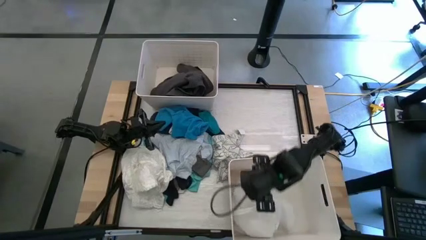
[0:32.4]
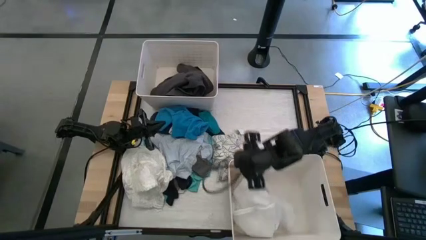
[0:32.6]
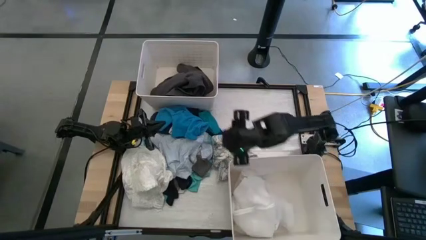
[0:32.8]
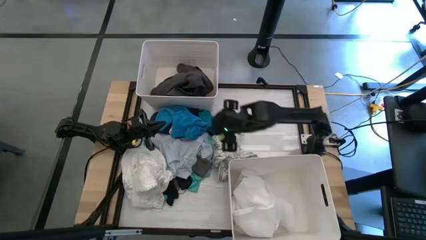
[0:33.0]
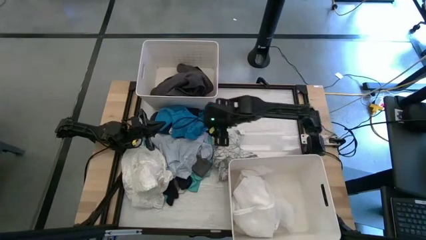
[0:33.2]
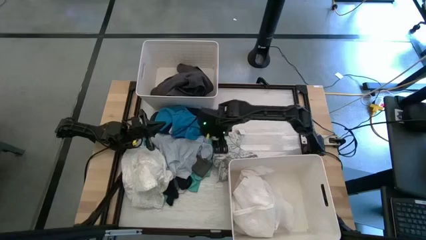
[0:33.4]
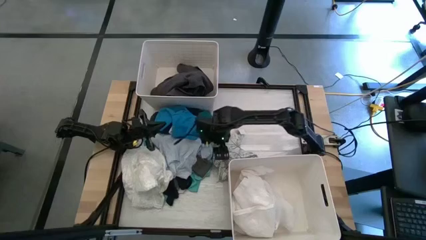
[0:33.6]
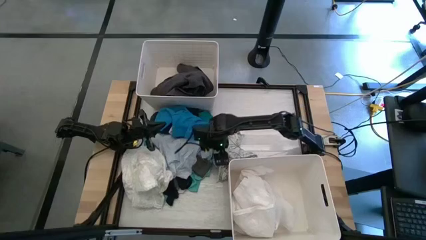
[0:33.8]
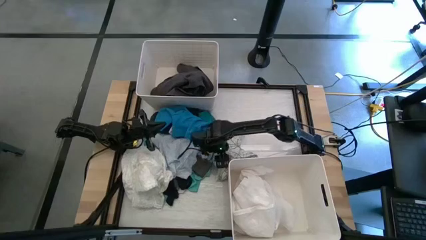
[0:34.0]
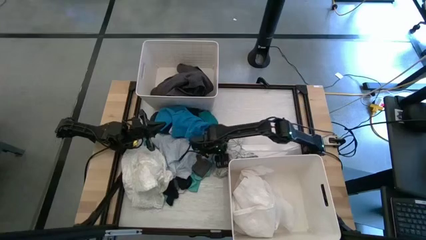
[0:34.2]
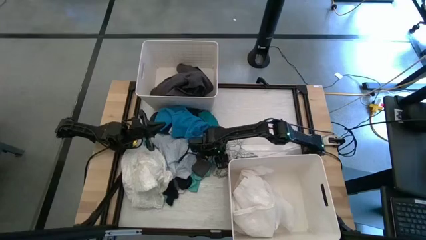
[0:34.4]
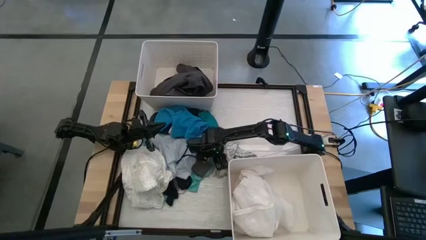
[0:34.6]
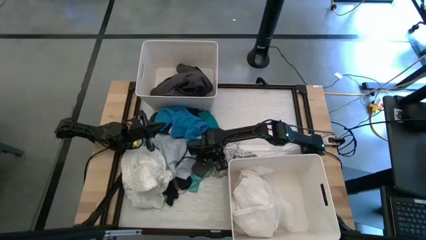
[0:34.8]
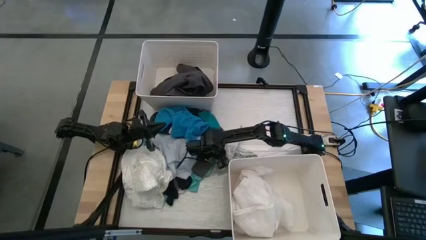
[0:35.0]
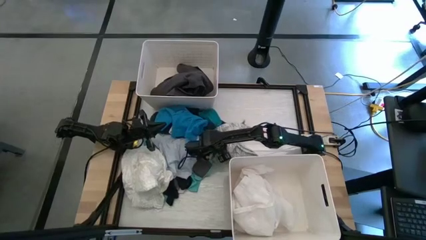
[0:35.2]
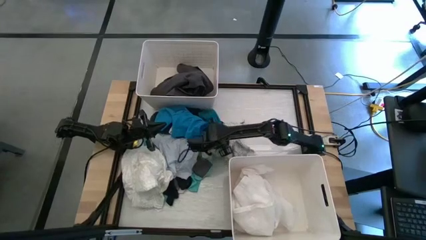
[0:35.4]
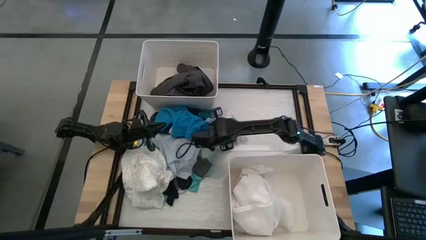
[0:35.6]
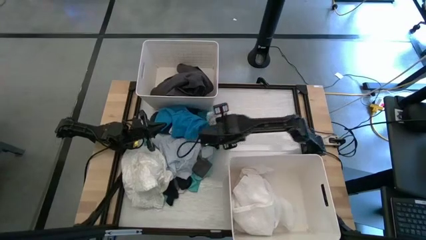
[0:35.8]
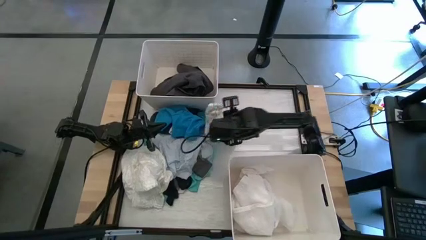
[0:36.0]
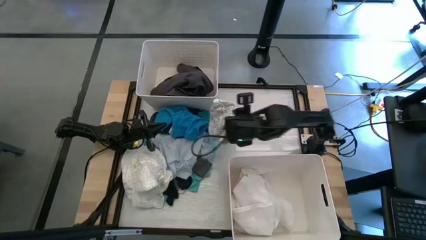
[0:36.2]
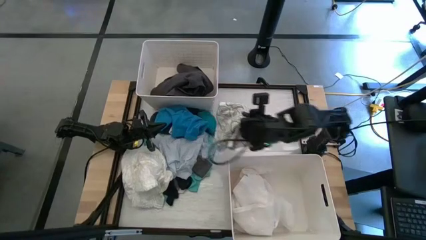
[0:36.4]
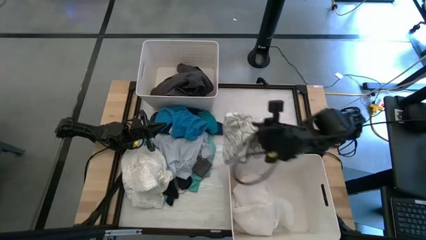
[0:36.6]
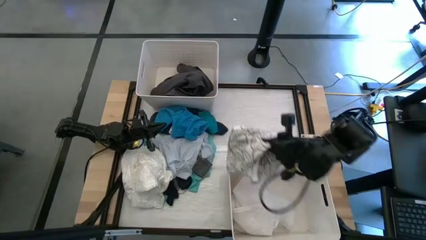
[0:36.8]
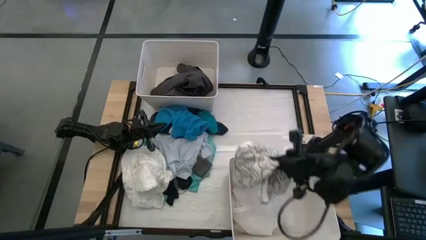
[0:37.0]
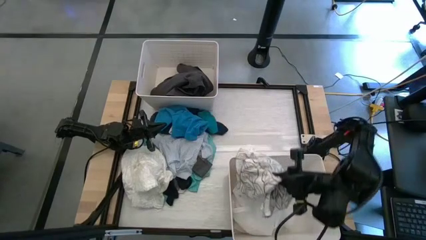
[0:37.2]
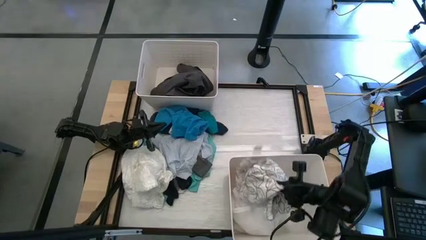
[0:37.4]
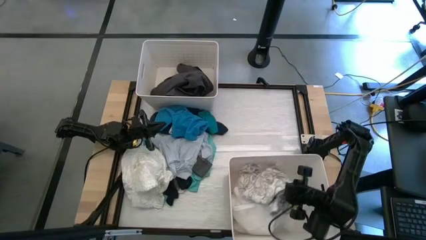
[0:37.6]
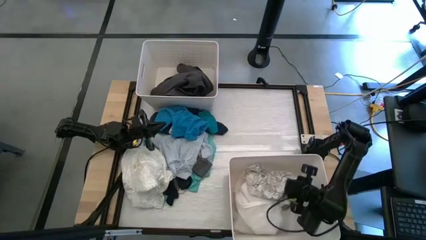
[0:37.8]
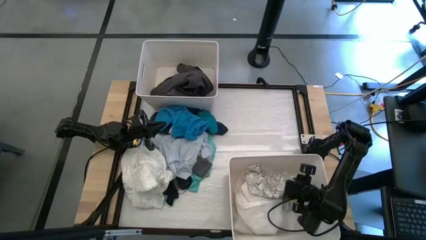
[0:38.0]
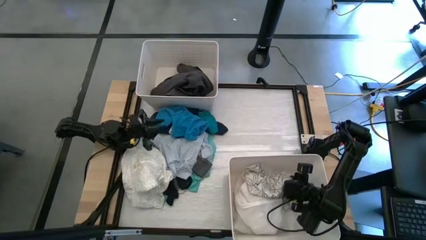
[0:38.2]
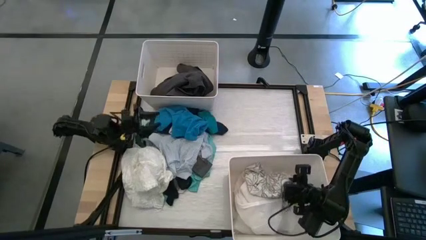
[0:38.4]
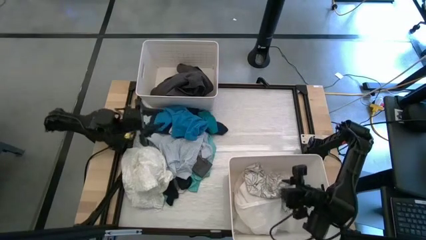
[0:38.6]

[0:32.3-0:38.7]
Task: Sort clothes
Put the white patterned shirt into the bottom white laundry organizer

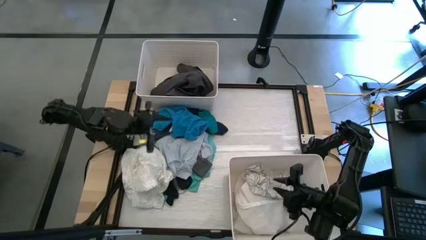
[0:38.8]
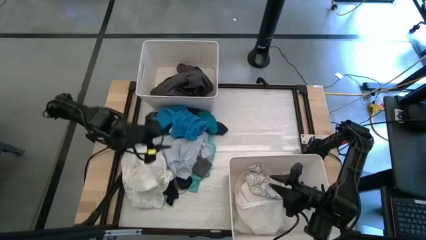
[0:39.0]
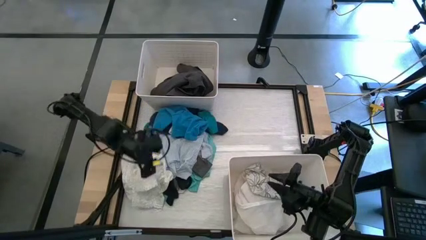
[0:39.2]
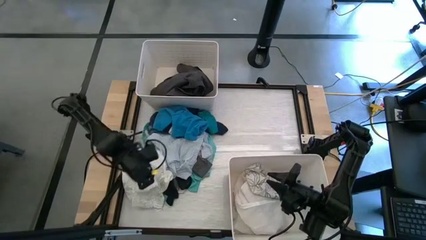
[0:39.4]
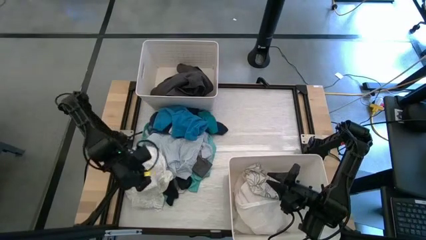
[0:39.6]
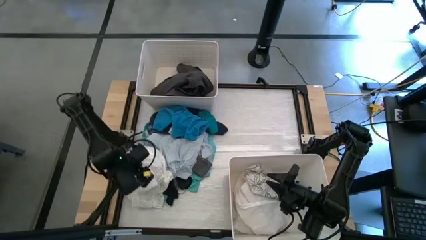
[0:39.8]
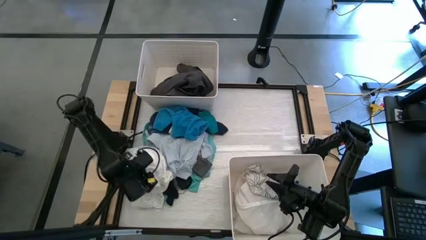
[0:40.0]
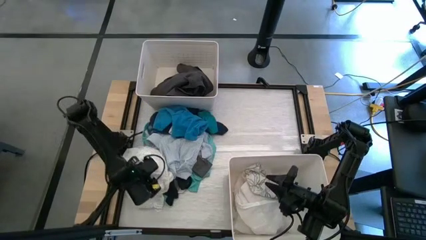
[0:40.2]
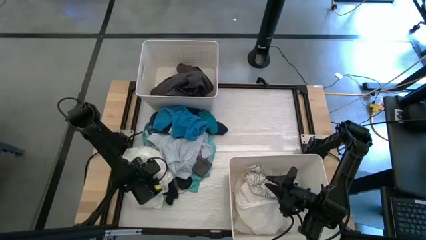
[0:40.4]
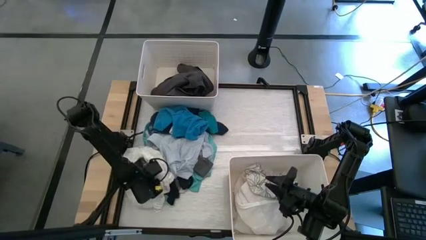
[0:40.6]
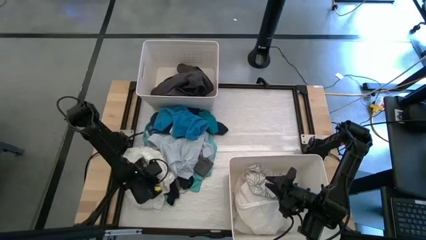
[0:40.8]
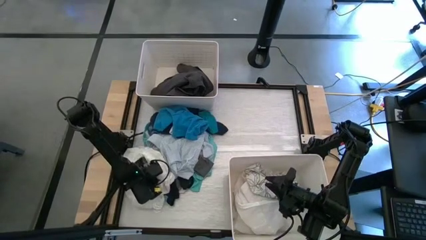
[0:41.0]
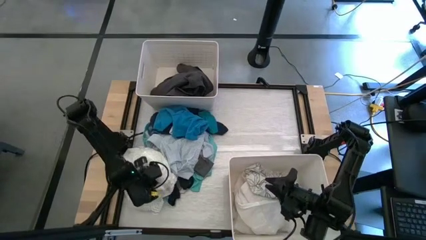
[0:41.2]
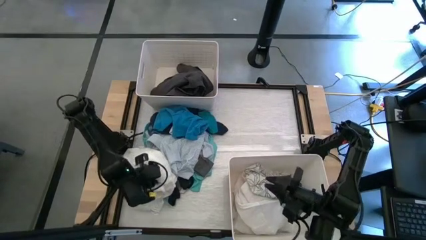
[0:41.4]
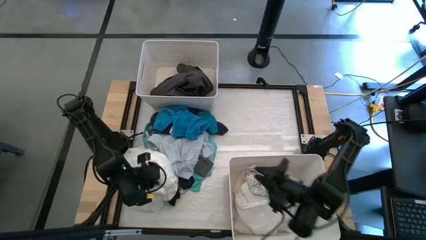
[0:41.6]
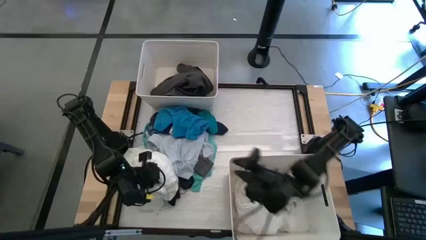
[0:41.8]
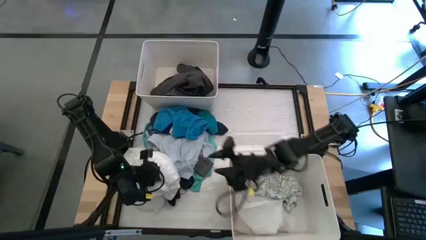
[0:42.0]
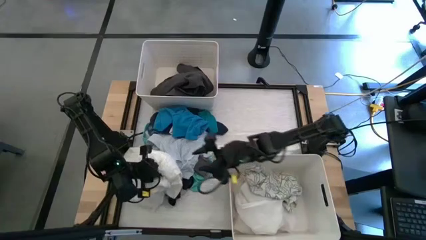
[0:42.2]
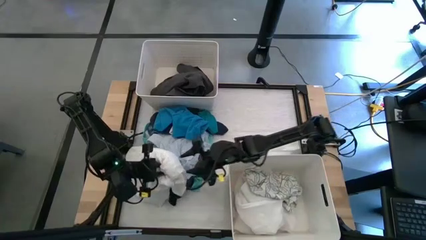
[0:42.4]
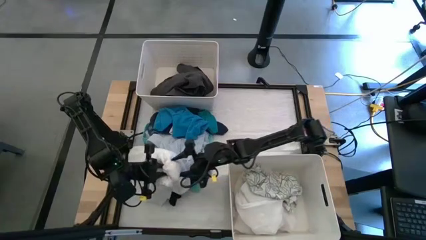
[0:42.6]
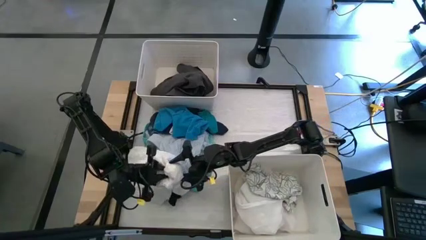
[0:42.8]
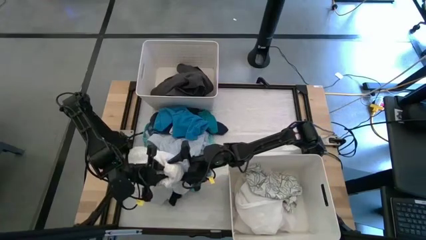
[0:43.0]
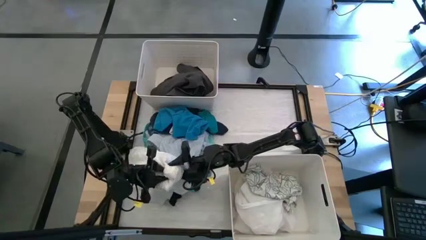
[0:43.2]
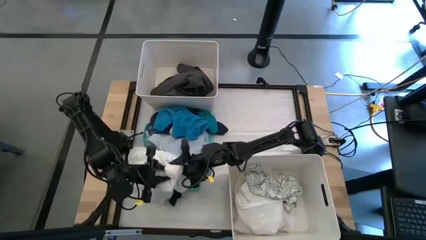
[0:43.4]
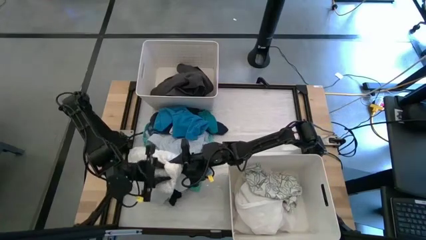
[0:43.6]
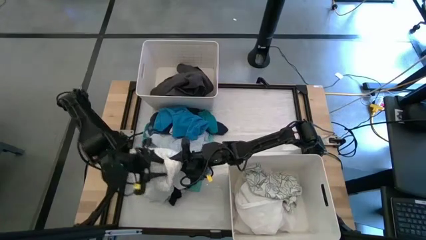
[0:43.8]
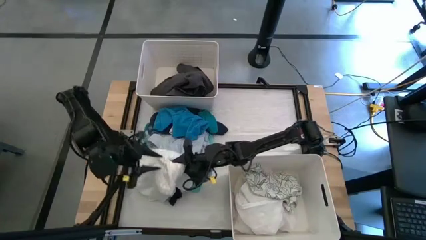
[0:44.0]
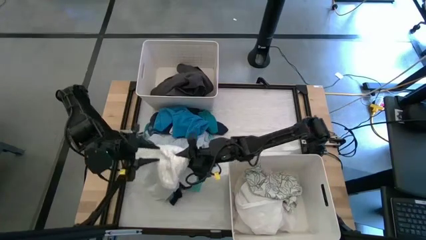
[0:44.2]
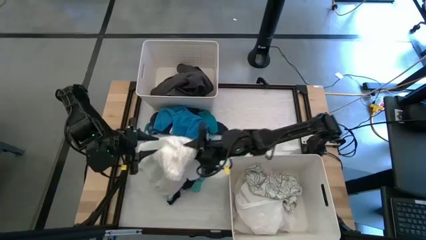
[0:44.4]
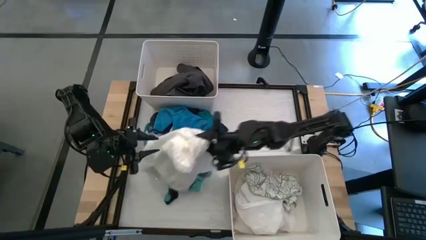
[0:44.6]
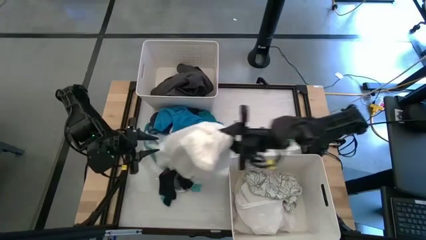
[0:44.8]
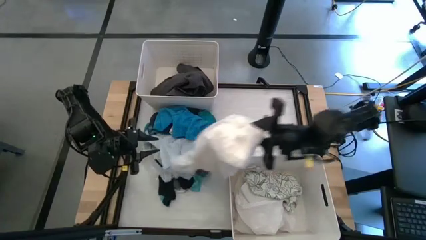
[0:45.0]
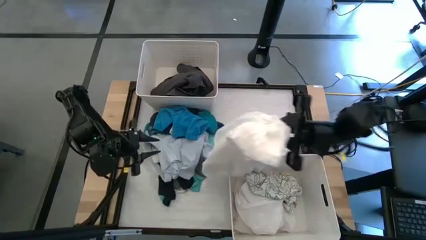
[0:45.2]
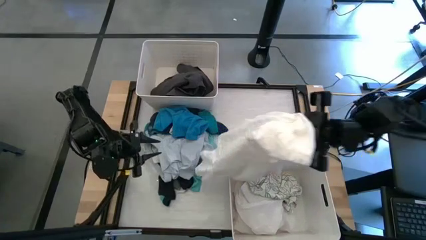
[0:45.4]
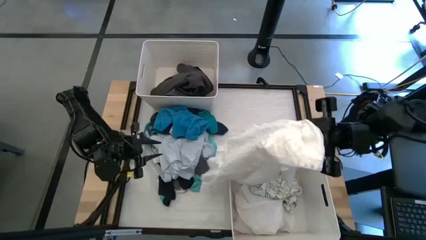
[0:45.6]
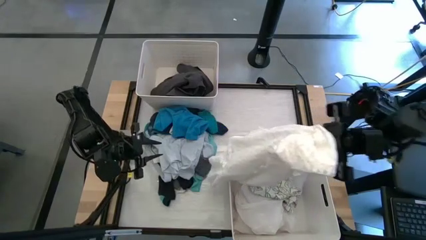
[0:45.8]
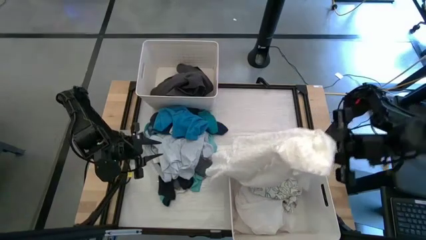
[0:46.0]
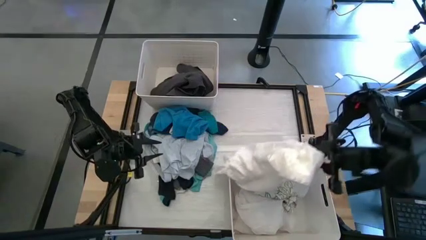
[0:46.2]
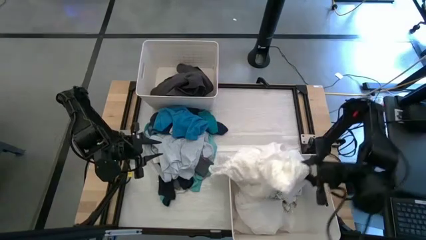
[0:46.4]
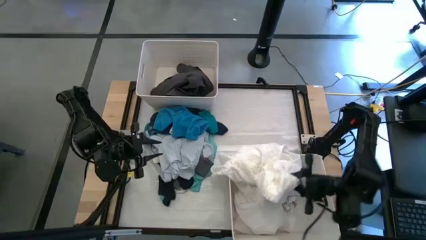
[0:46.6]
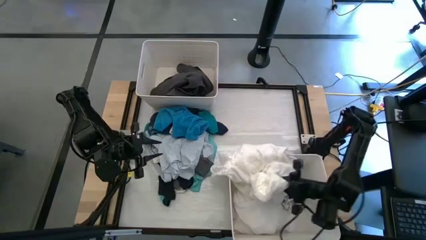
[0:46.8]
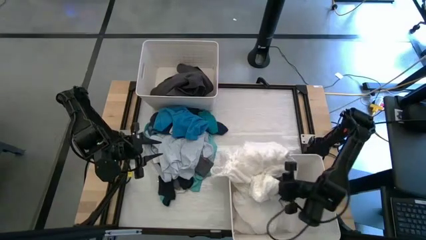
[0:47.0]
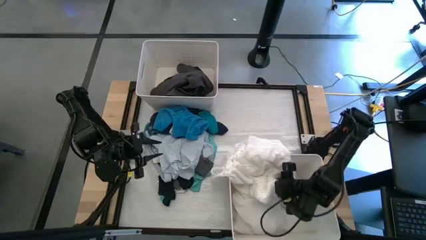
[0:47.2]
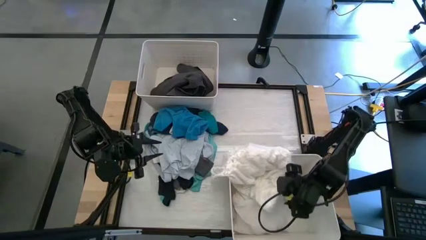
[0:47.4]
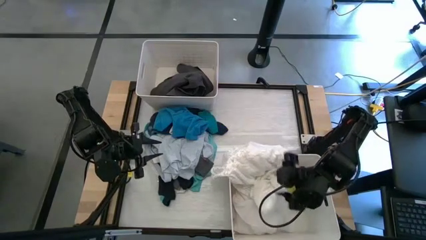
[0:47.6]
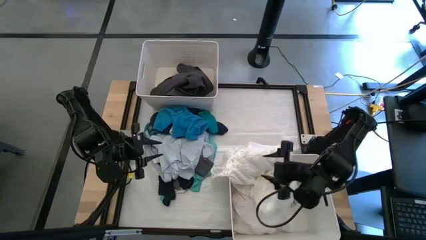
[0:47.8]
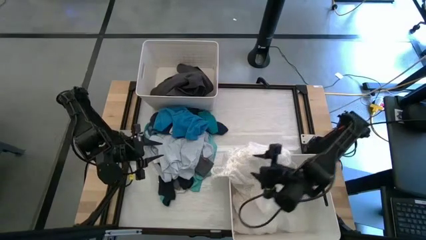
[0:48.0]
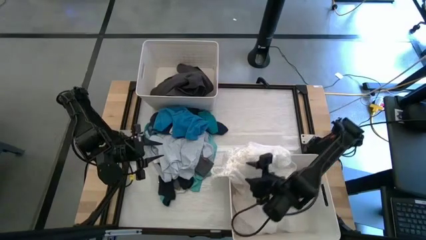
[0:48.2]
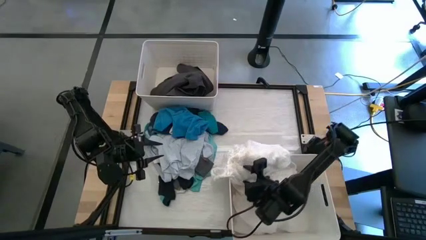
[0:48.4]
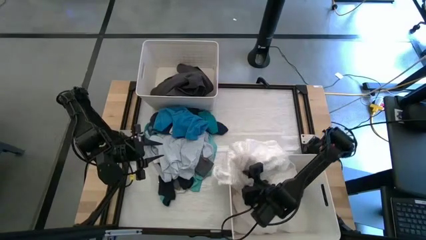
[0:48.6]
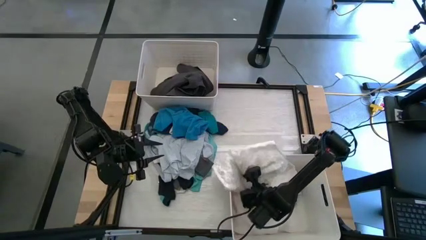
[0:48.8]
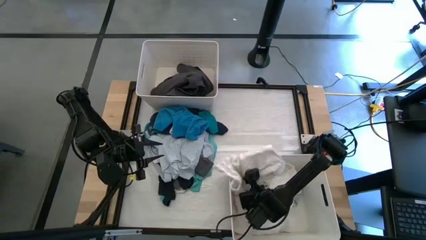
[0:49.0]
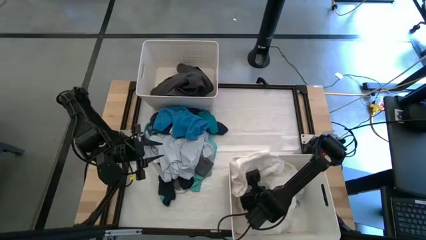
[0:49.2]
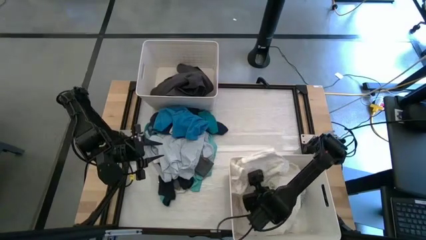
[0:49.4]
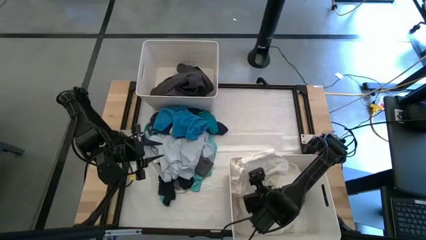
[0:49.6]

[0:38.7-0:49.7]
Put the white shirt into the bottom white laundry organizer
